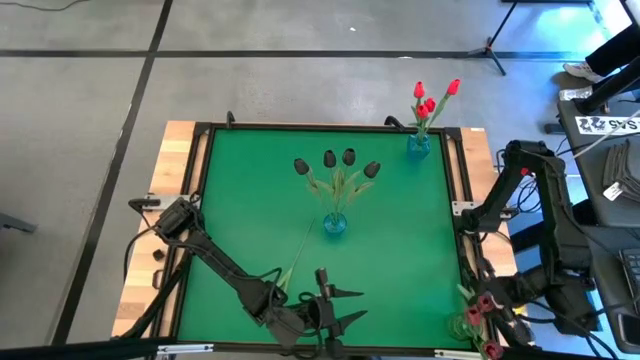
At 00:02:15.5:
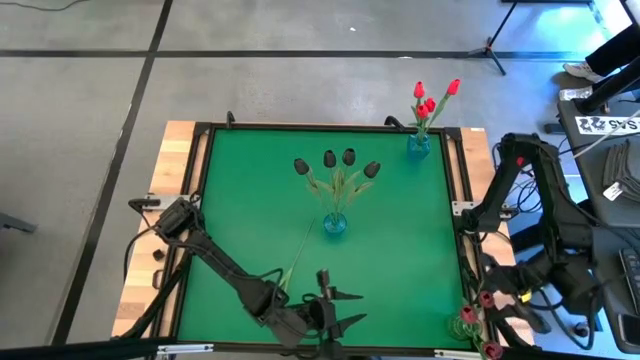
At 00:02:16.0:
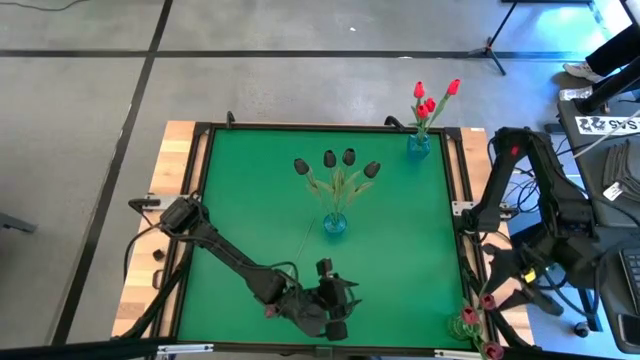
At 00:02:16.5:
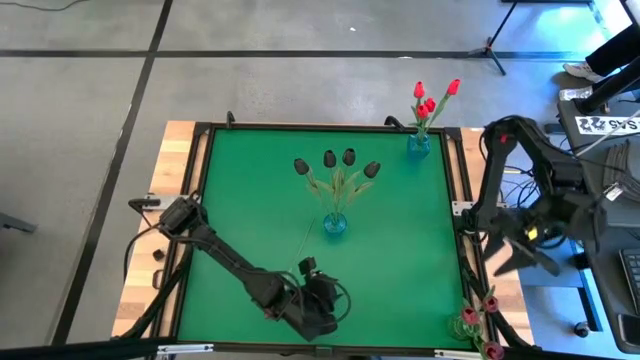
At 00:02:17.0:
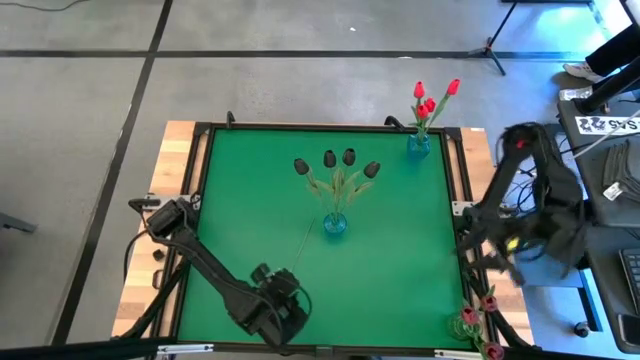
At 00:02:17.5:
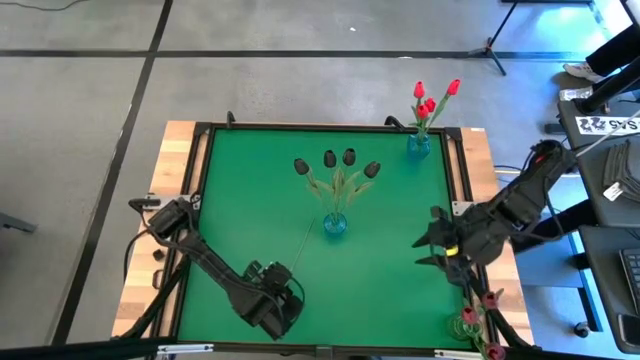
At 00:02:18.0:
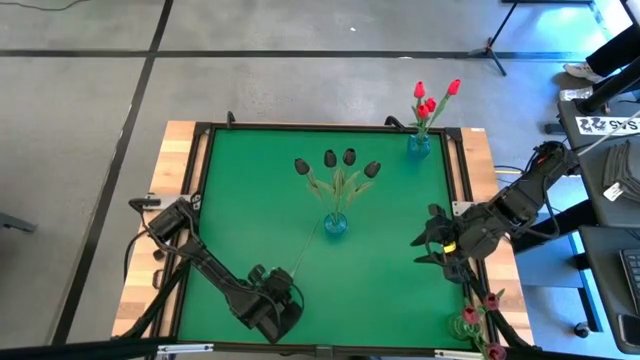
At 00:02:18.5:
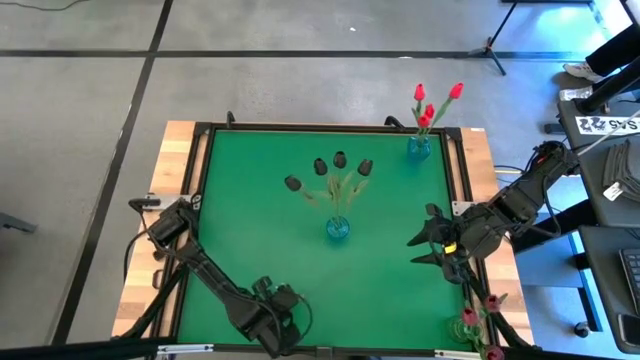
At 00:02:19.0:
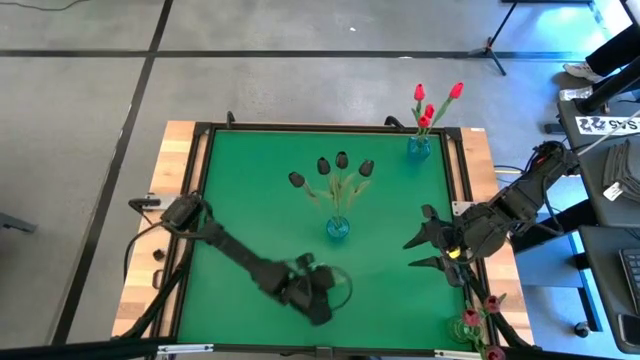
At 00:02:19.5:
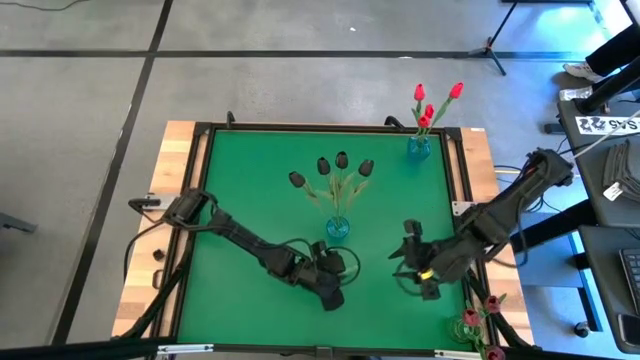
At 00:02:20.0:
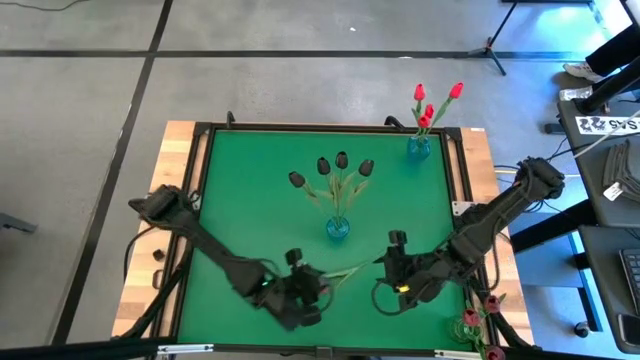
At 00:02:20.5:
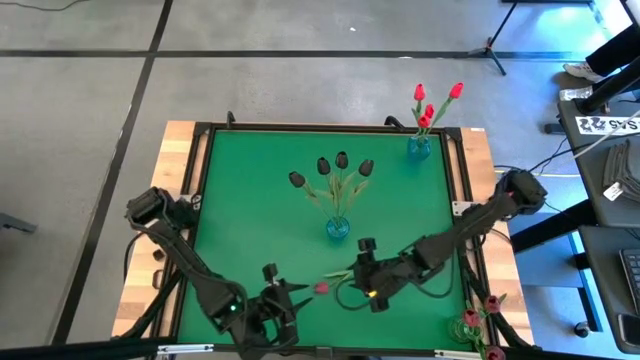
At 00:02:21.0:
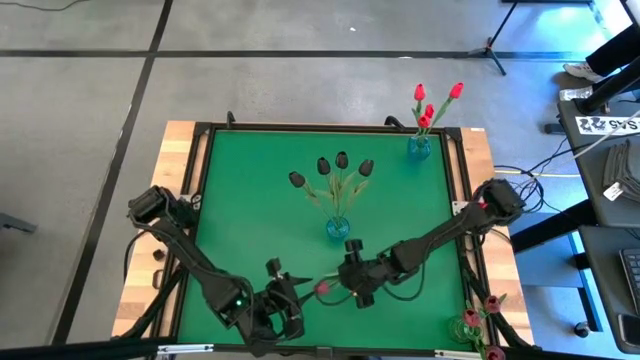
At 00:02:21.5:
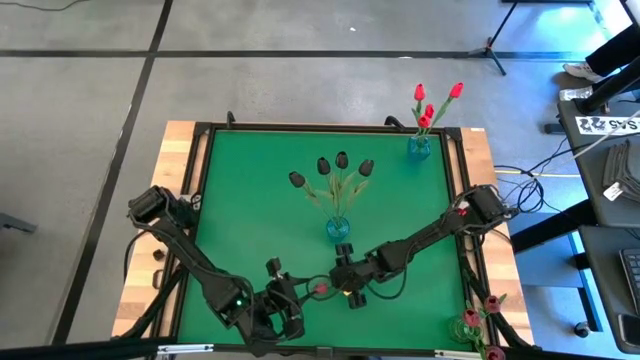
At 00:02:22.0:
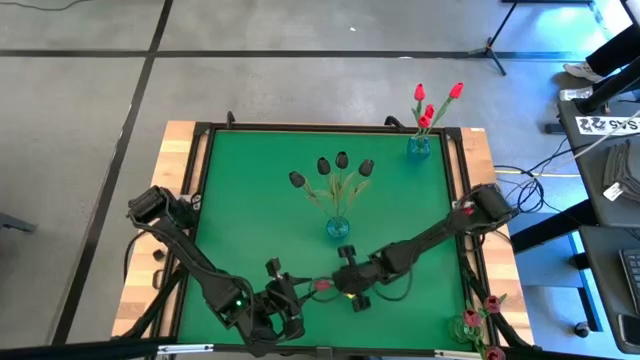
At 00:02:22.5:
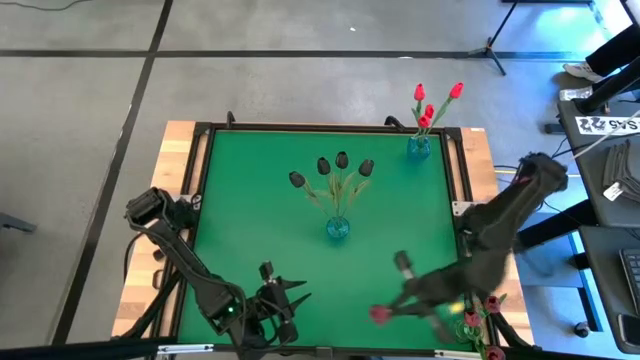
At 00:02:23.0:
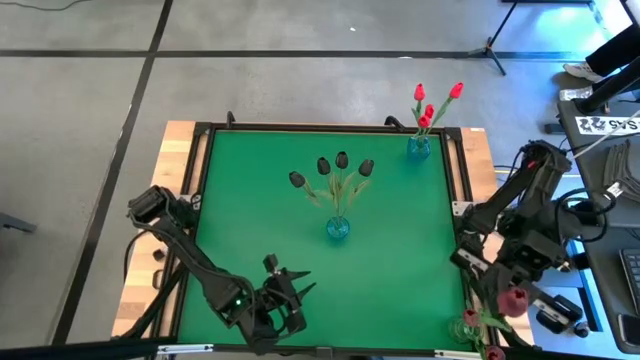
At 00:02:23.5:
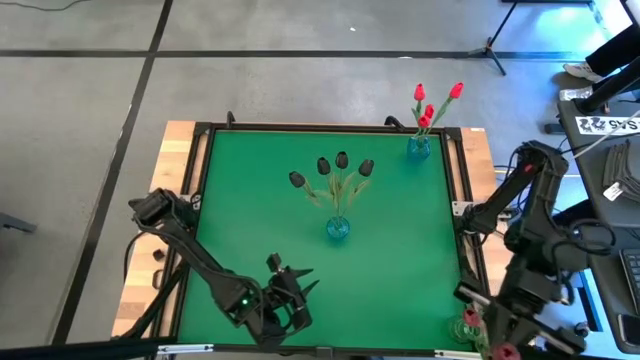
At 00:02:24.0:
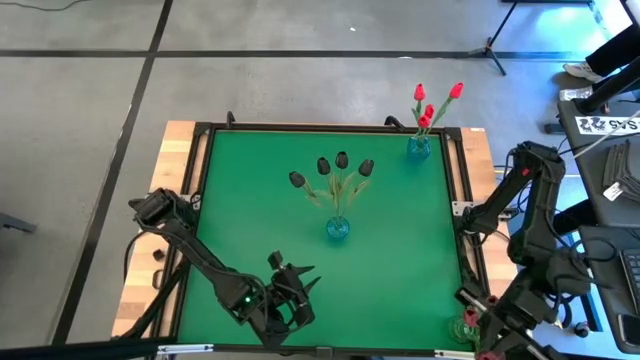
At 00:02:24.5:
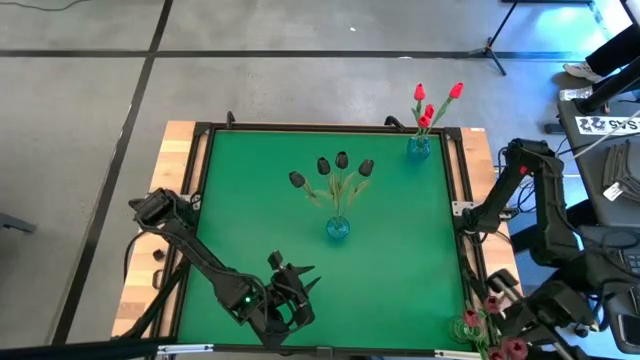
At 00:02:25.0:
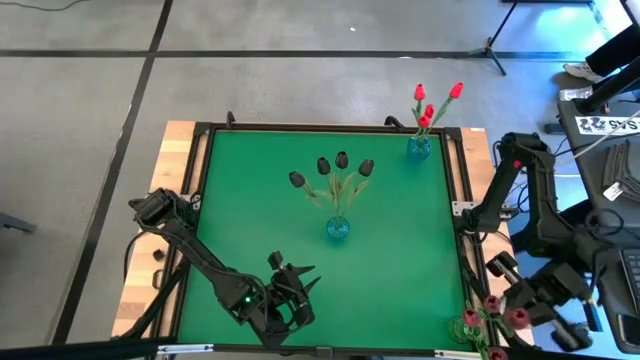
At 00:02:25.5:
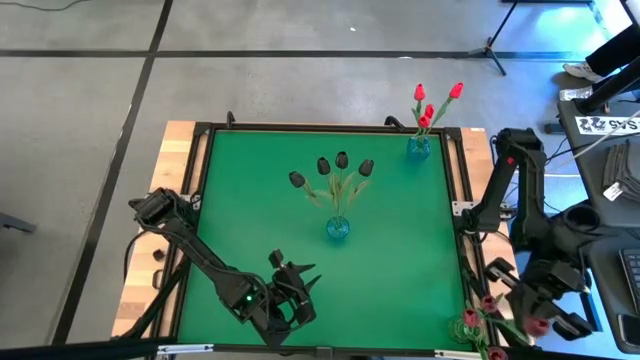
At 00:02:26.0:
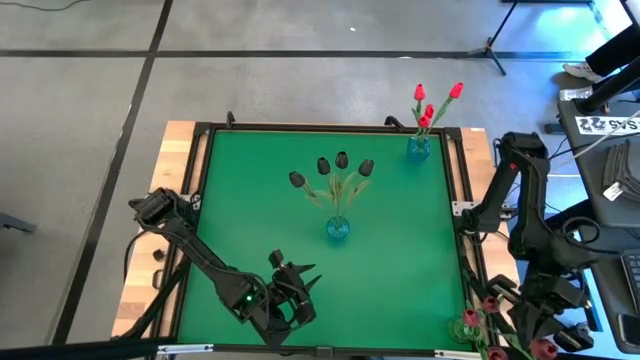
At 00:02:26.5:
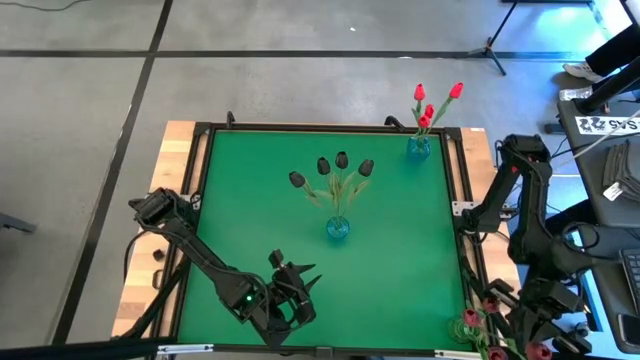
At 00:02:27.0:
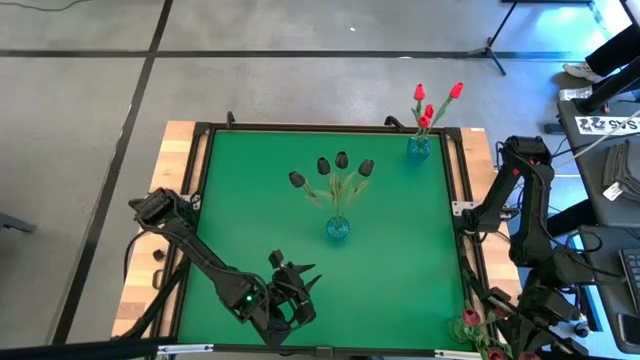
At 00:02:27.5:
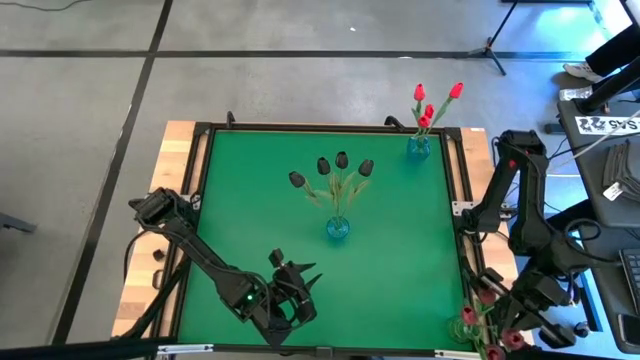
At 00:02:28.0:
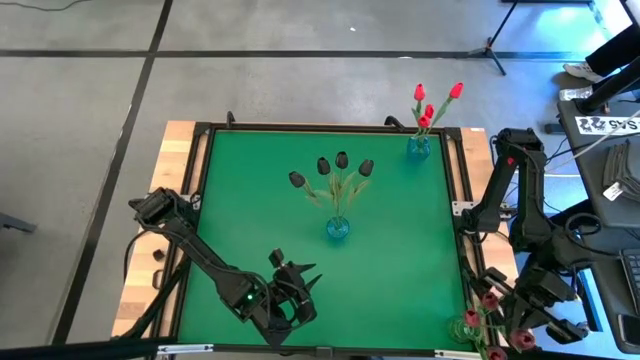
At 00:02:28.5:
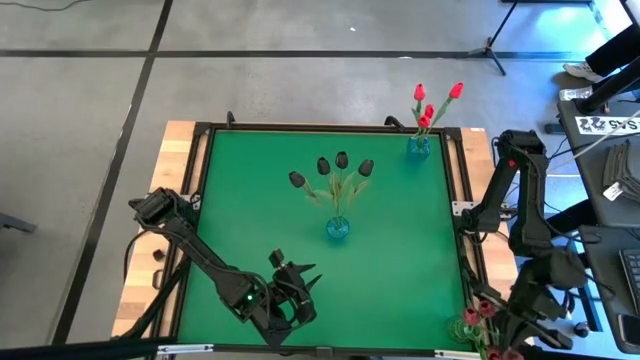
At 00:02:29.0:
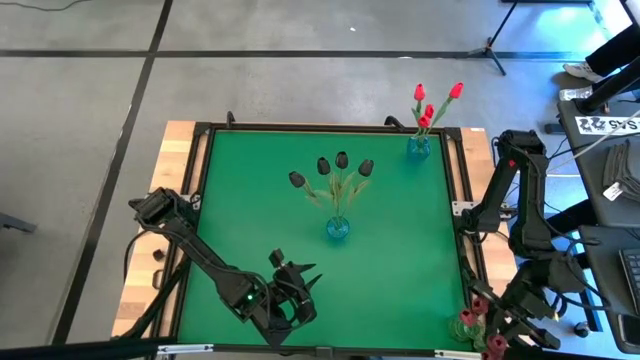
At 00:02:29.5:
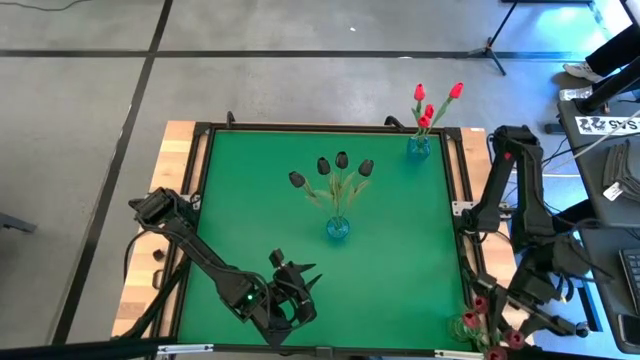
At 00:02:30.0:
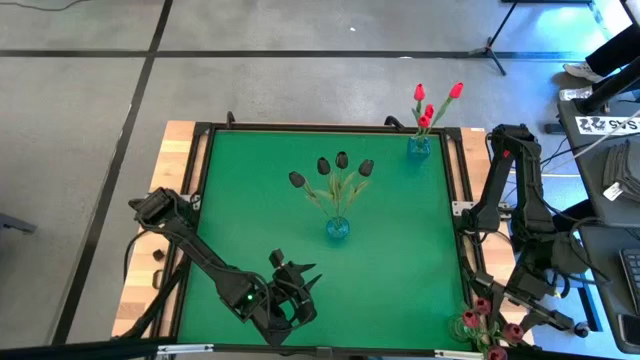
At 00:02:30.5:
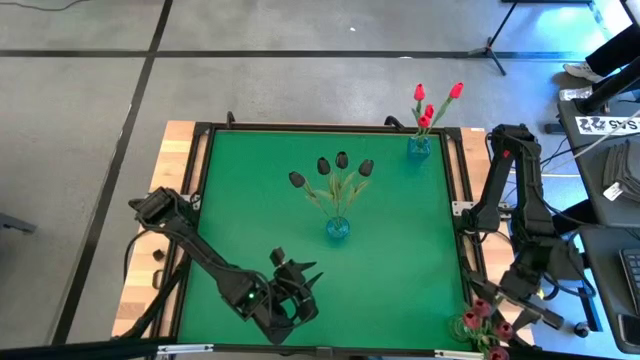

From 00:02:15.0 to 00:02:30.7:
Task: Sort flowers into vase by color
Put the pink tulip into the green vase

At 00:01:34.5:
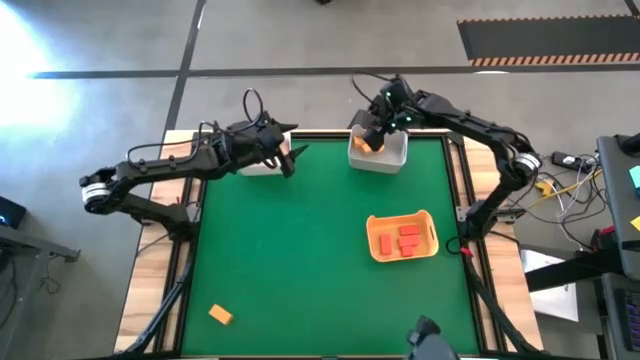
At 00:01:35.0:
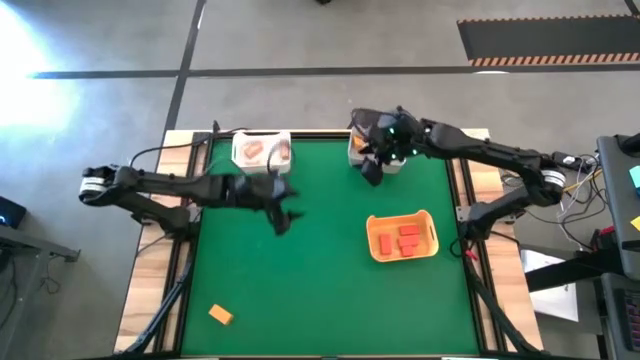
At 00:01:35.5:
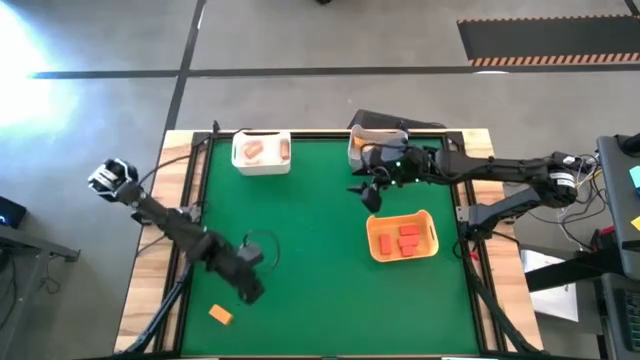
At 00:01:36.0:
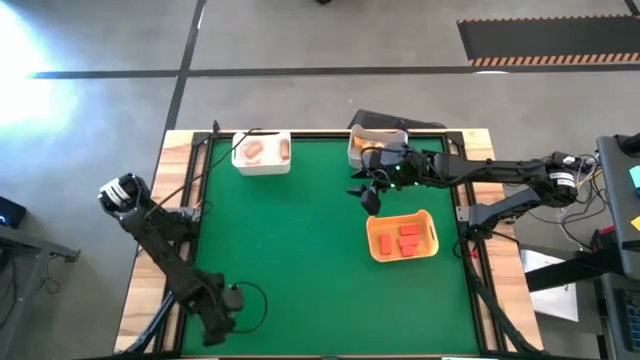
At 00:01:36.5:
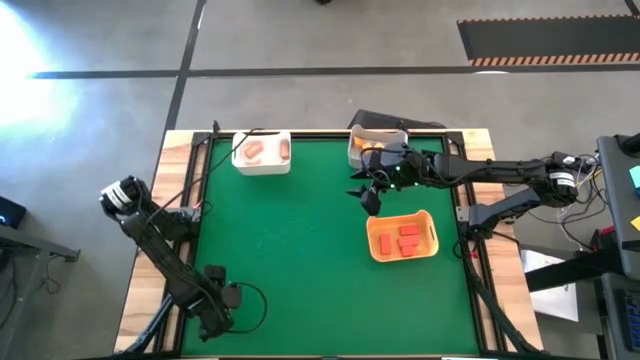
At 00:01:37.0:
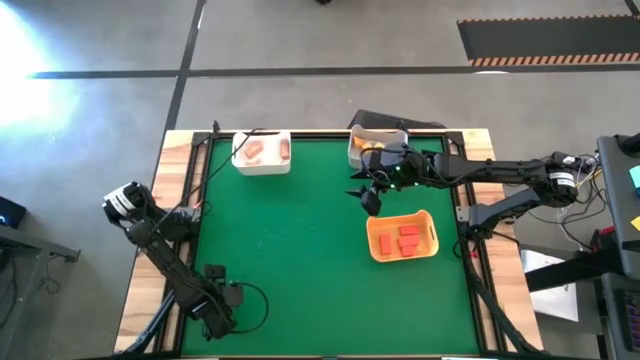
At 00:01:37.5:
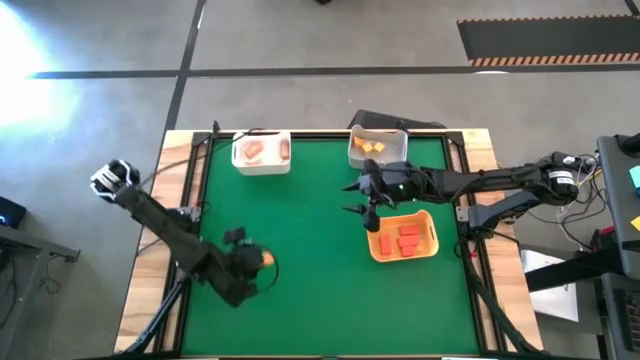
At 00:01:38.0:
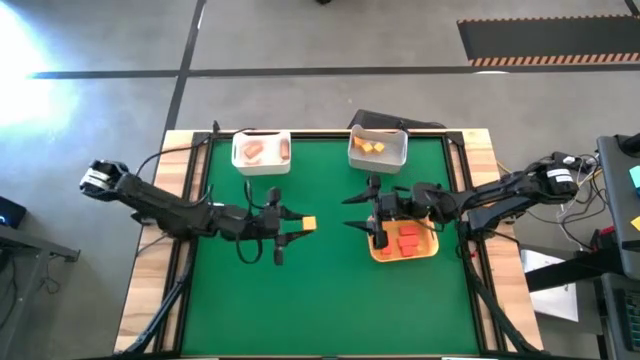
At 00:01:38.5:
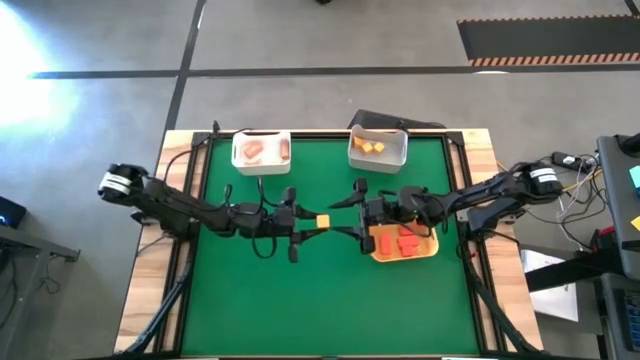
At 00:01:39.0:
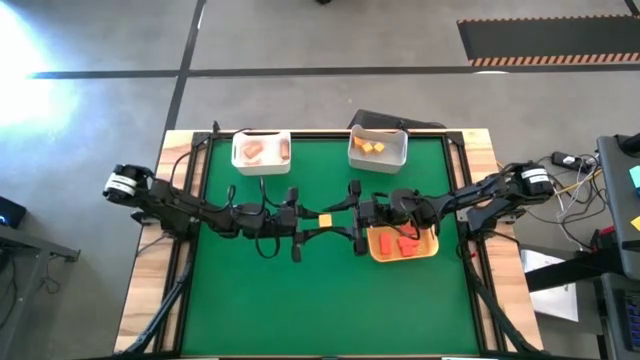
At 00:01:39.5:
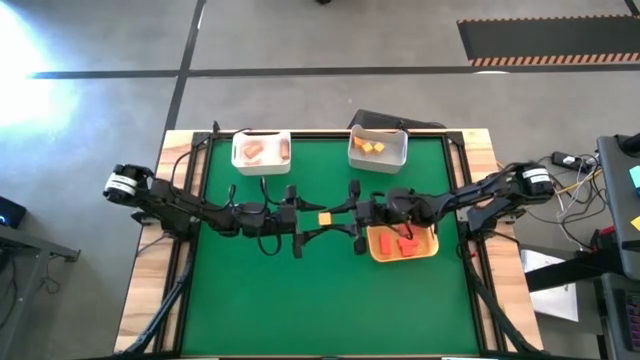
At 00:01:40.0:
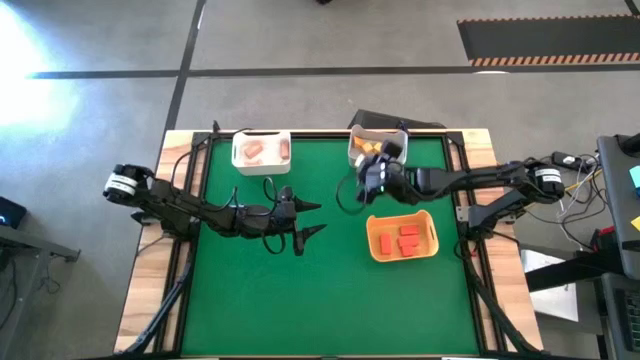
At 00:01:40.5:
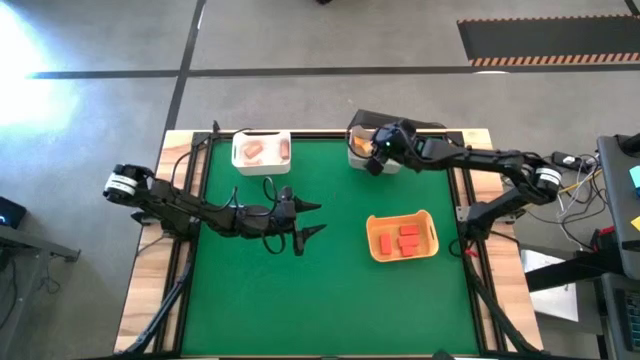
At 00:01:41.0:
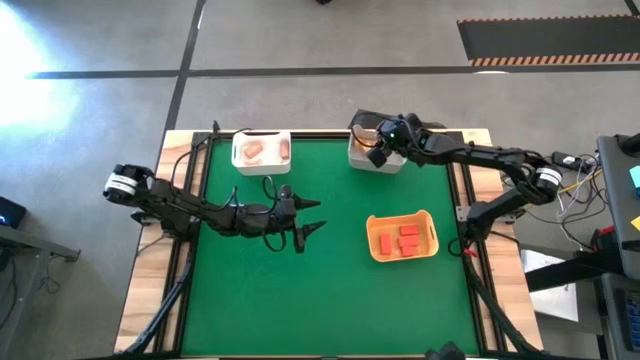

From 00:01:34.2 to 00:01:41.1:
Task: Sort & place blocks by color
Put the yellow block into the gray bin
